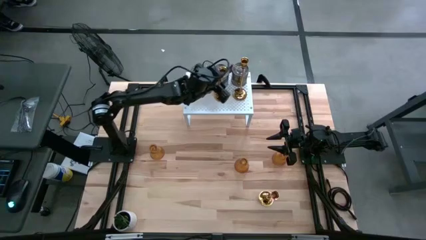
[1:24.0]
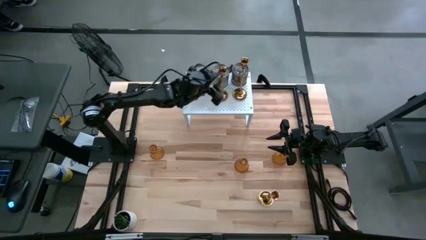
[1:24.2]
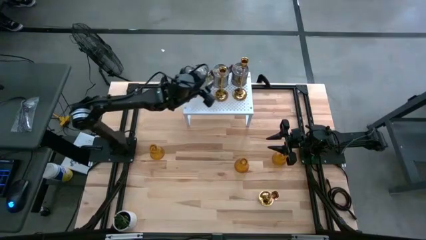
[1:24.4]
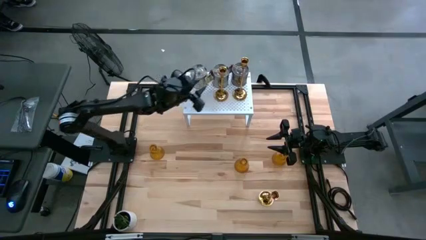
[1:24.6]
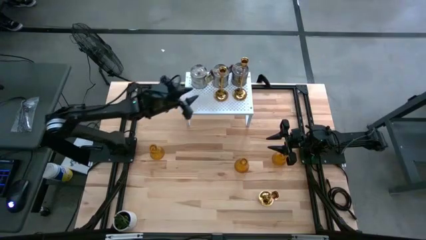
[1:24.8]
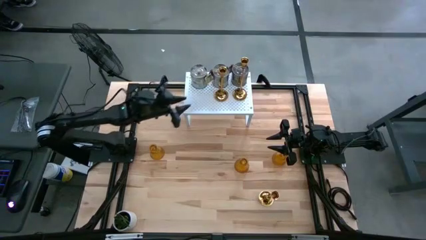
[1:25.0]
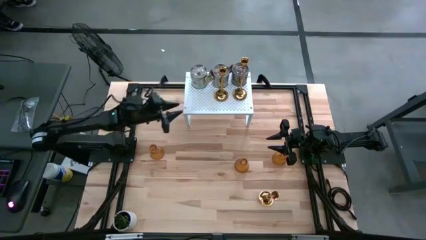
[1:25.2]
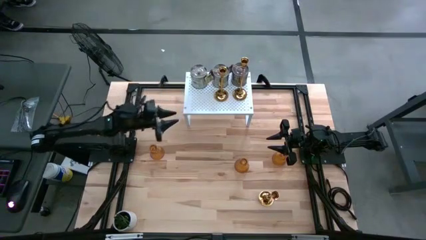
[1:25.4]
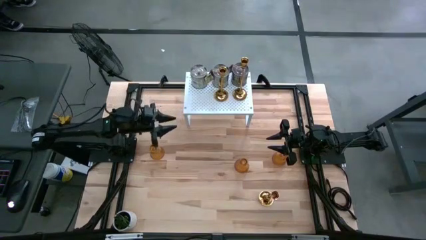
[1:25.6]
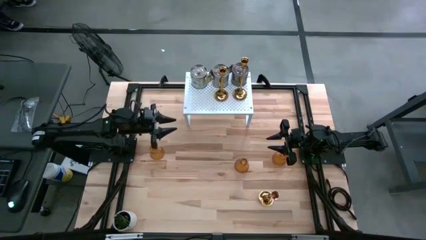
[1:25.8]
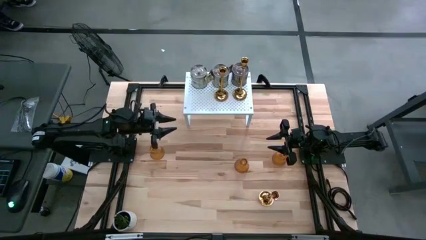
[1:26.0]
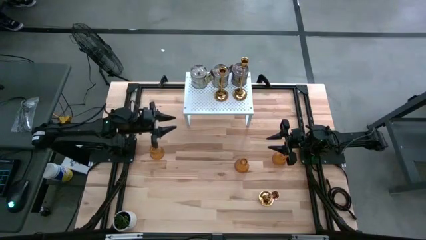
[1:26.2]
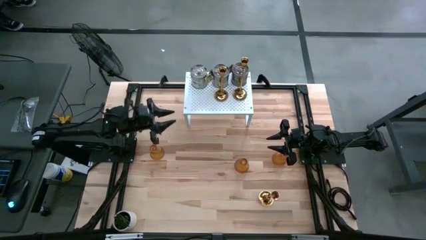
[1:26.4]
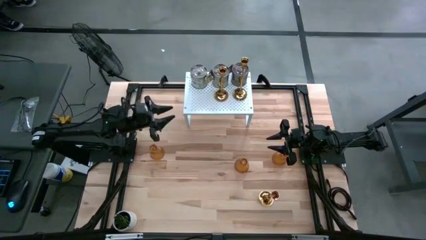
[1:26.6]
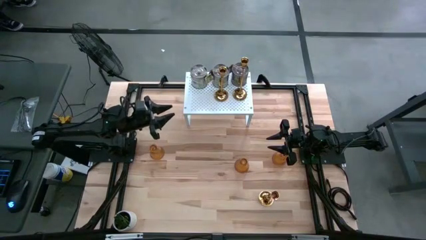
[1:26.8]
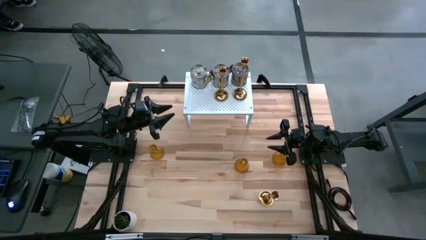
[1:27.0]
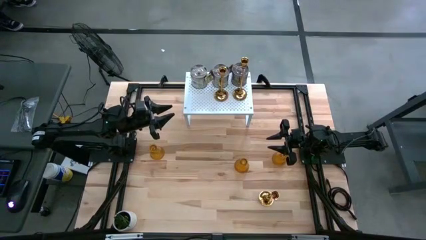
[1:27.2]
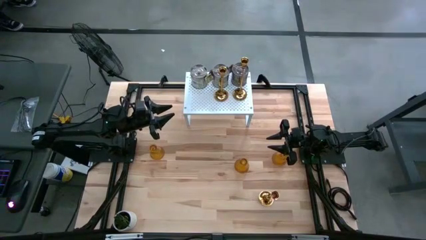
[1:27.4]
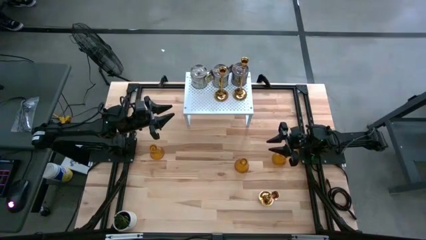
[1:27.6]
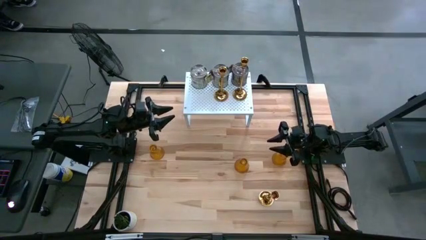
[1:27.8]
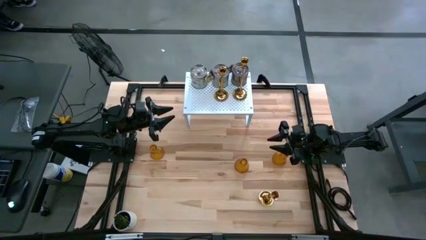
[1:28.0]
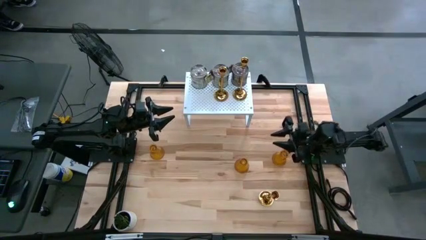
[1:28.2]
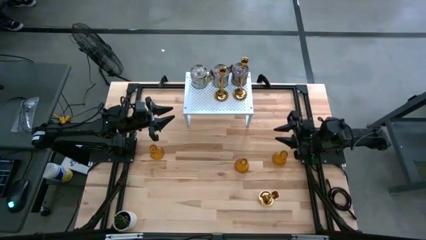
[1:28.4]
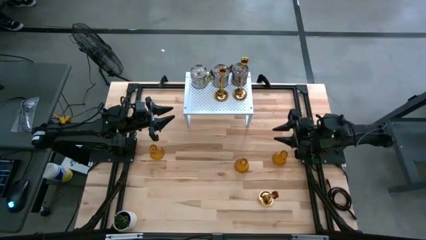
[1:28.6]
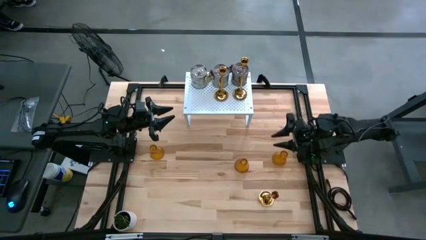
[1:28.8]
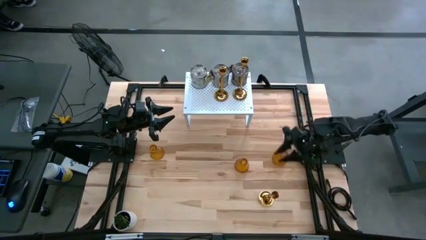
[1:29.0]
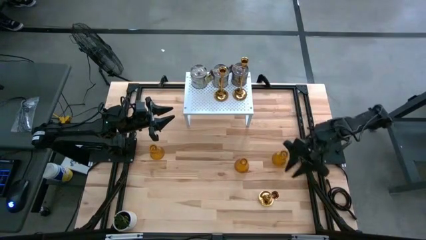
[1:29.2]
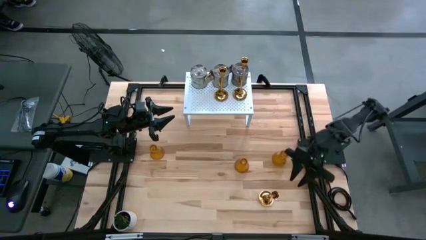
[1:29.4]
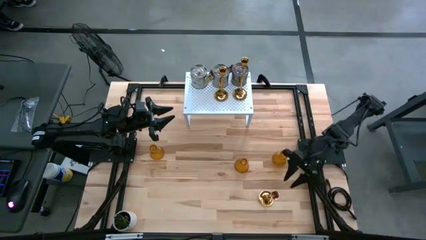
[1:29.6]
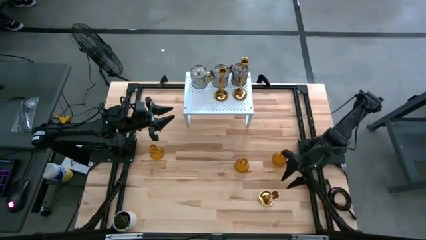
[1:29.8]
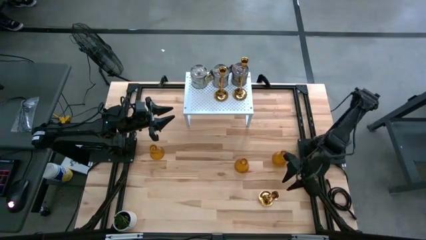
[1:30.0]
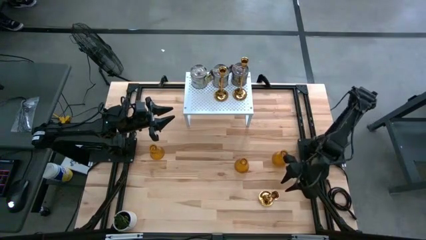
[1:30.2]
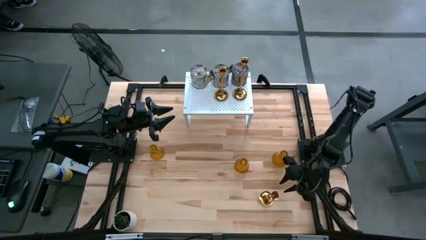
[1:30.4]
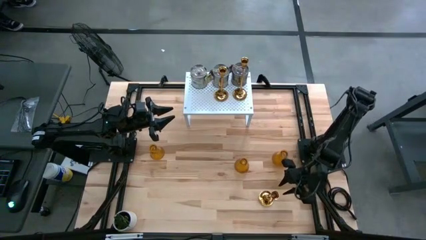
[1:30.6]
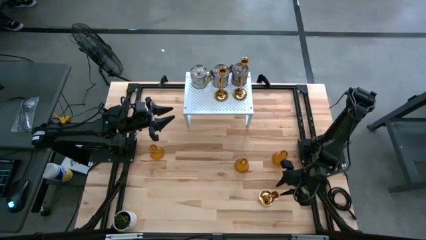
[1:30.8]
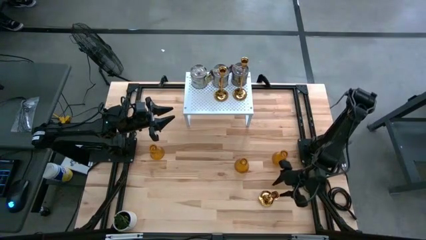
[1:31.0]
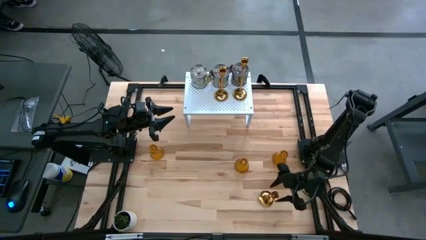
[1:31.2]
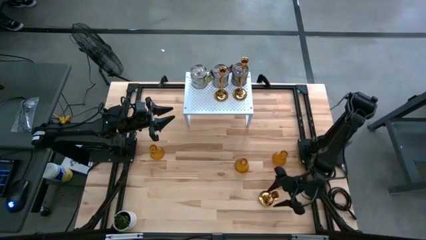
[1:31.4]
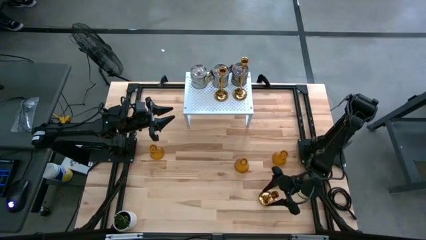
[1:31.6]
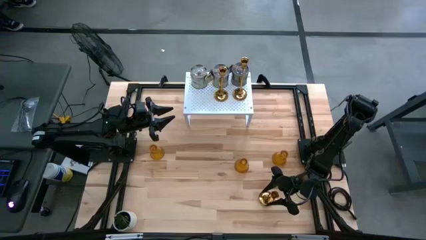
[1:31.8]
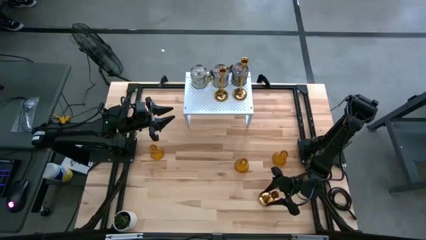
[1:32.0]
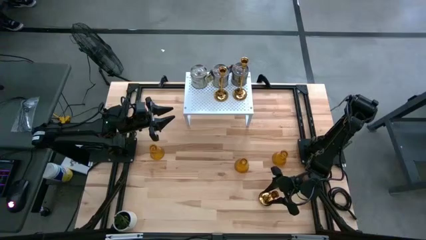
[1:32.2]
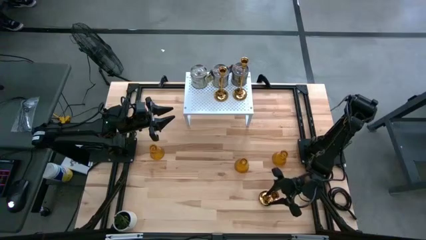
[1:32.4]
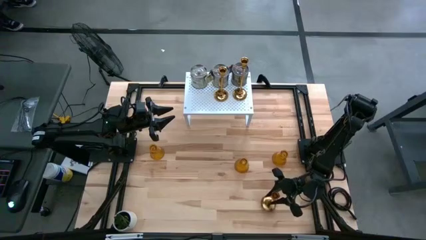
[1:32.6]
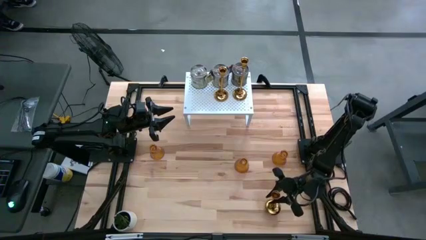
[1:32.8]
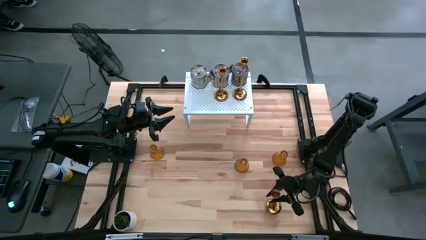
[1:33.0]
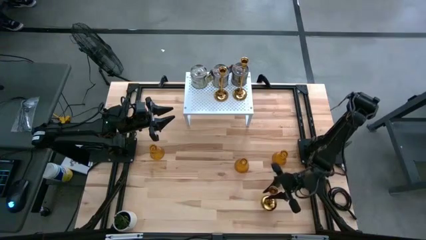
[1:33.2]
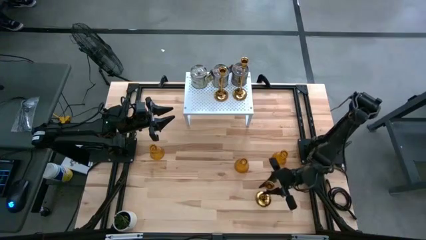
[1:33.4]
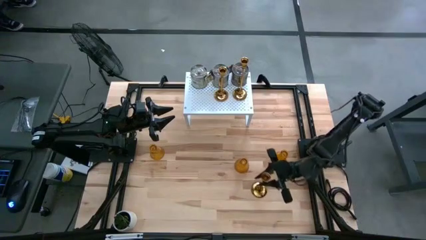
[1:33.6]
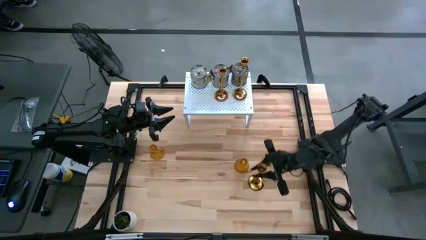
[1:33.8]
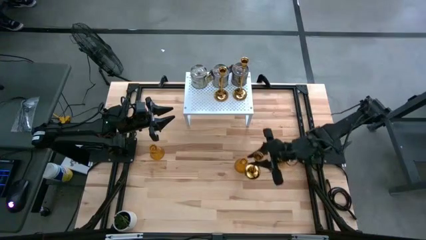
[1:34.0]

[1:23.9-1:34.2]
Task: Pick & Place candle stick holders
Put the gold candle stick holder aligned with the other gold candle stick holders on the shelf

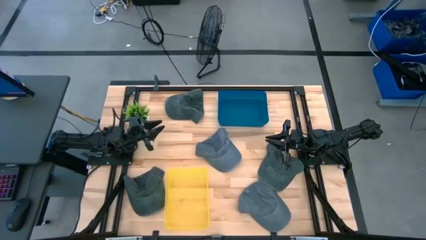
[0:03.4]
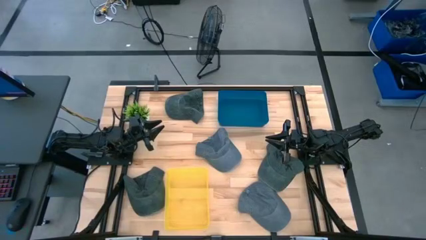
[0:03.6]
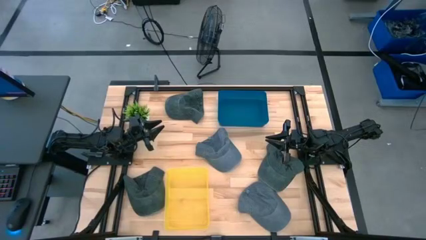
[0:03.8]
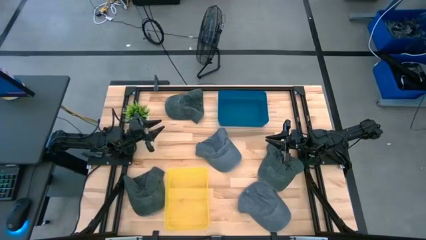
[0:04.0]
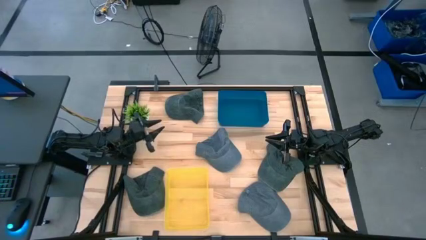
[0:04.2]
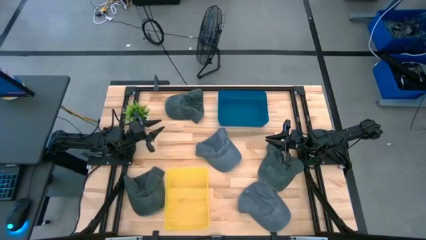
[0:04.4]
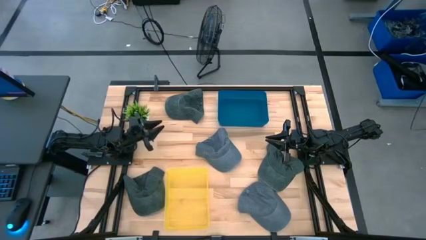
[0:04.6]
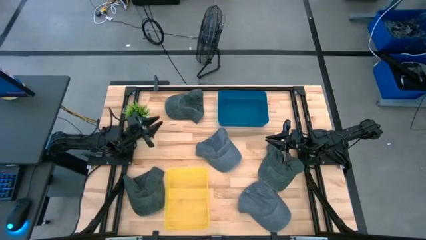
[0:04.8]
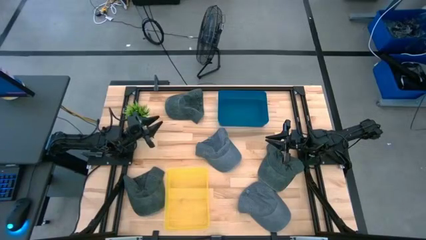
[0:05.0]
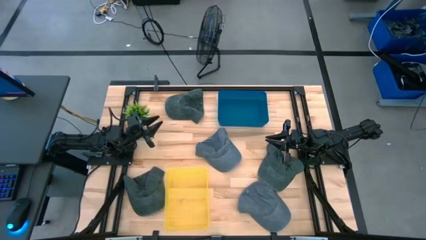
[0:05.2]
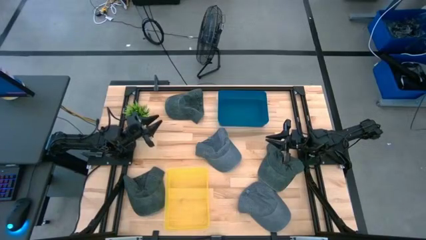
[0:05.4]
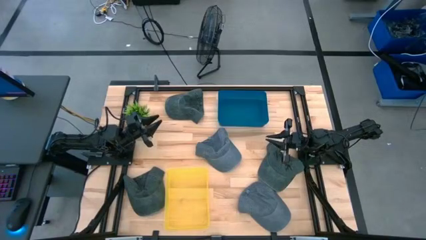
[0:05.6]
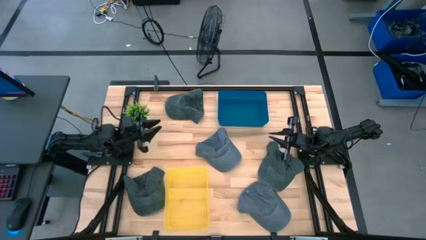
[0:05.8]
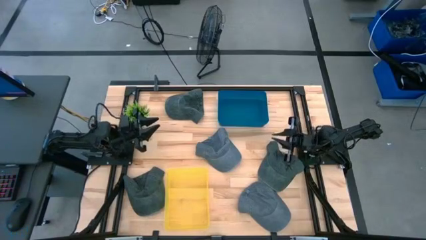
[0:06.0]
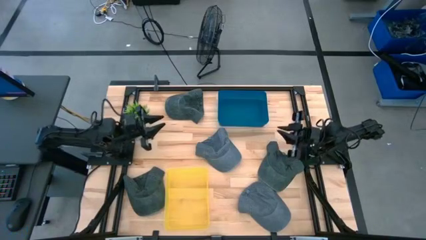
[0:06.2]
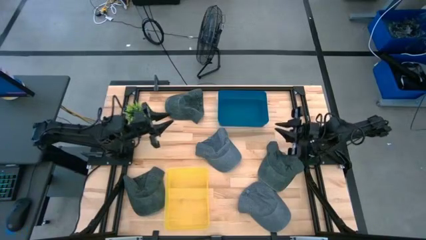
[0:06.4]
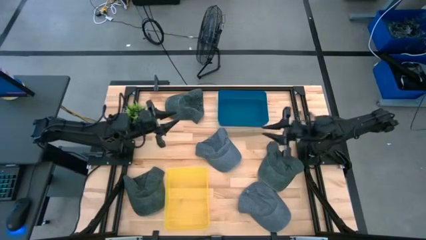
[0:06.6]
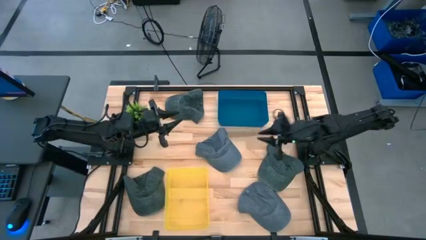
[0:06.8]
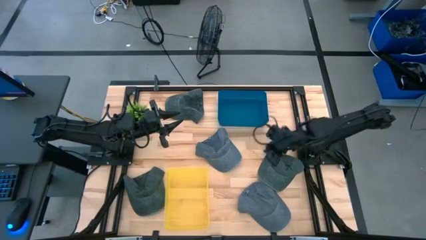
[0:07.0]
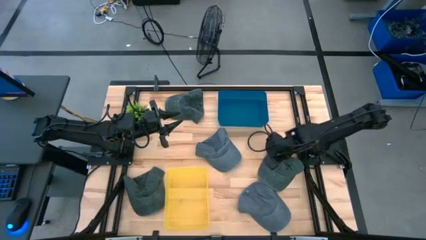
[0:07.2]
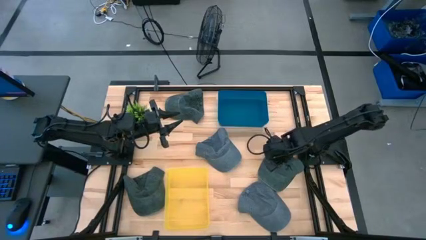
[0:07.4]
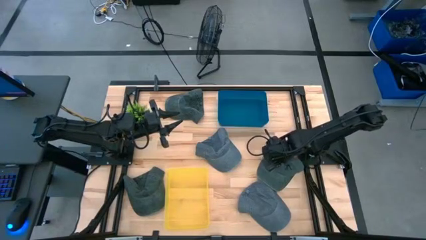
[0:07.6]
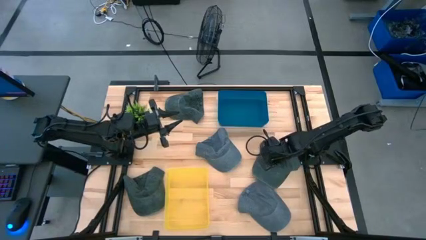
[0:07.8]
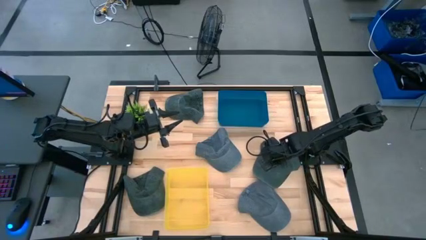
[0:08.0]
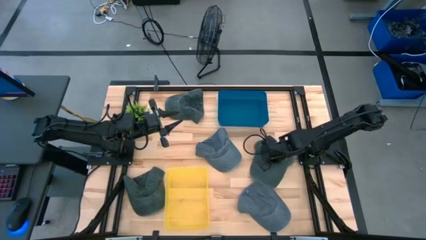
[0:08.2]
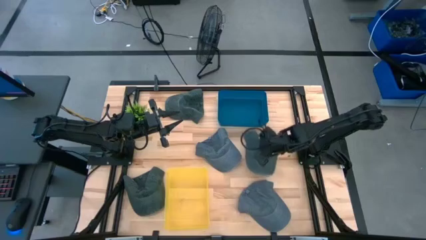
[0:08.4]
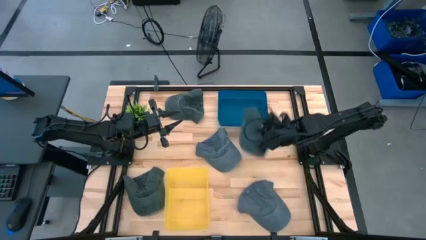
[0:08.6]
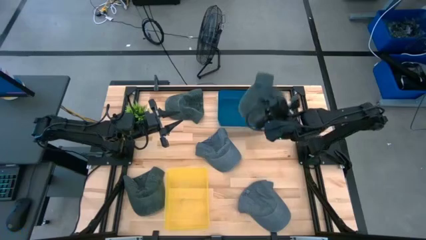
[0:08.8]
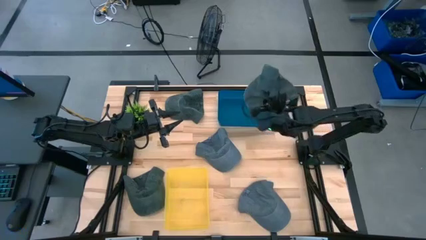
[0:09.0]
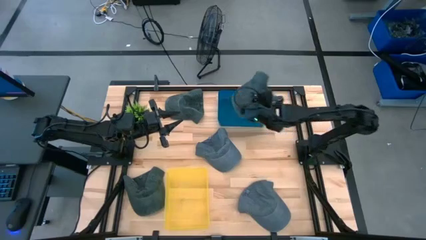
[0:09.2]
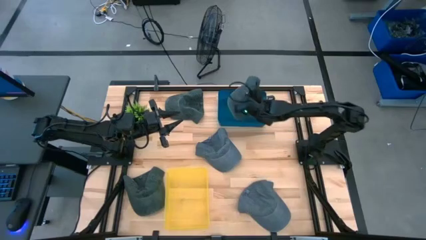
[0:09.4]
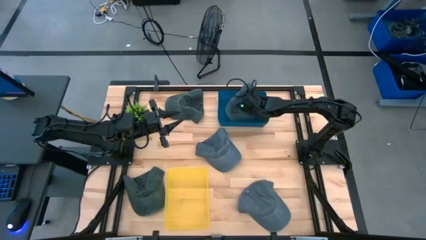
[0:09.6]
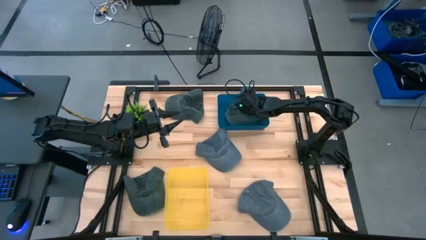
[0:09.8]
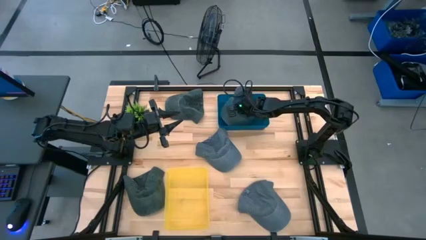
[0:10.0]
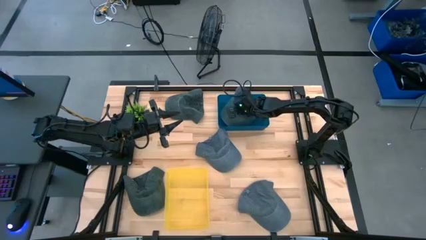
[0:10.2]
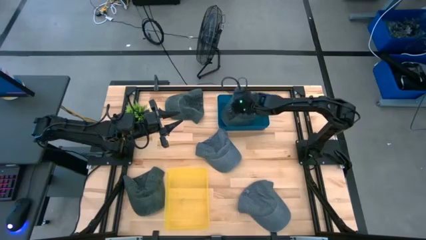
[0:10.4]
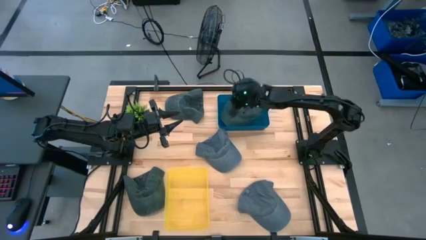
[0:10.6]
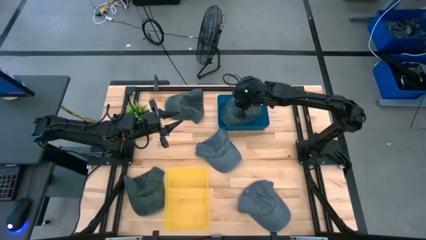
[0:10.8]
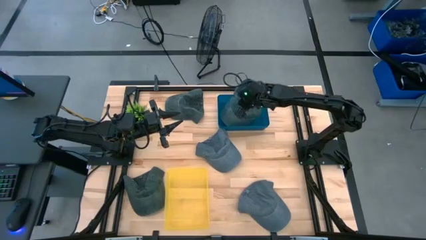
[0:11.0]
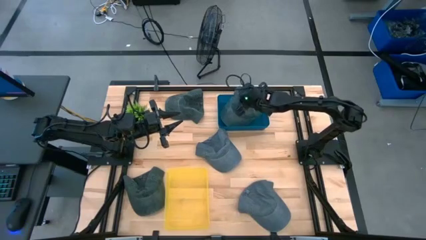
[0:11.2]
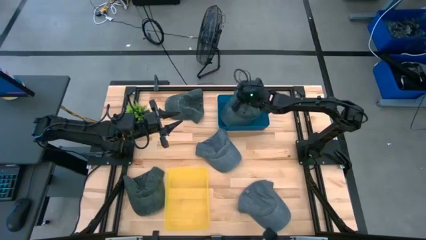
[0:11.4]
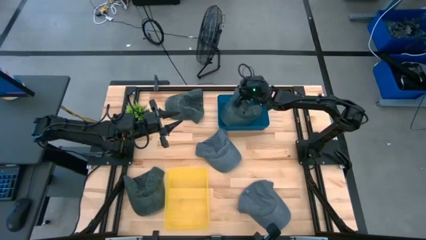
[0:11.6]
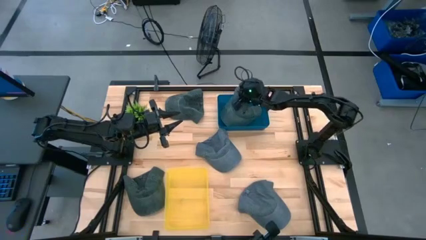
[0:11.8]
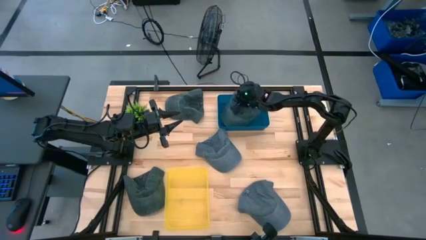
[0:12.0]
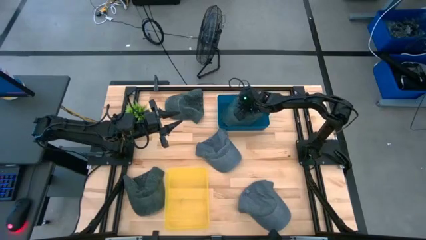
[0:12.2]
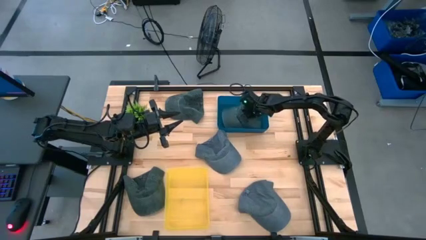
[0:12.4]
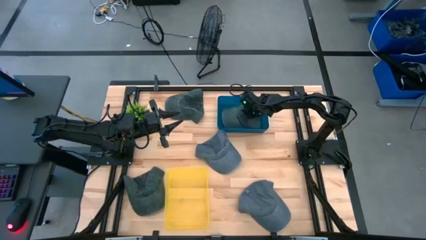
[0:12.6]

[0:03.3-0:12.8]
Task: Pick & Place hat
Put the bottom right dark gray cap into the blue bin
